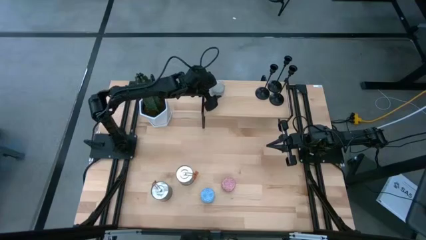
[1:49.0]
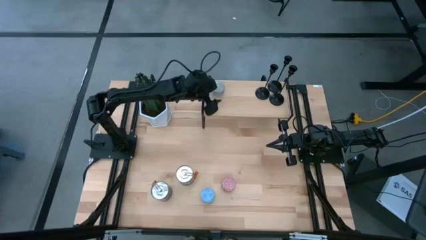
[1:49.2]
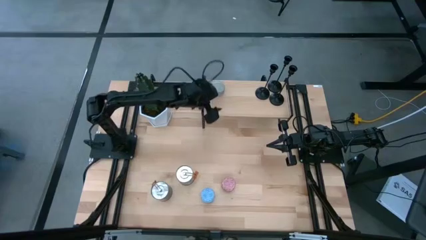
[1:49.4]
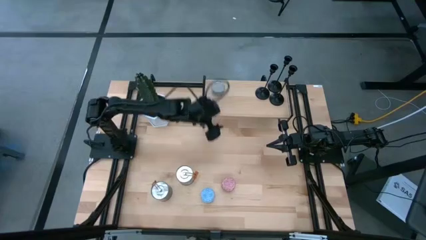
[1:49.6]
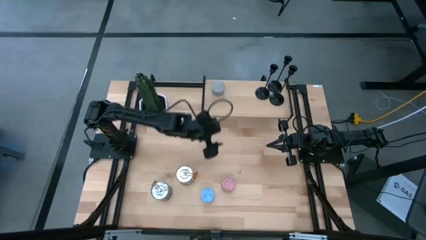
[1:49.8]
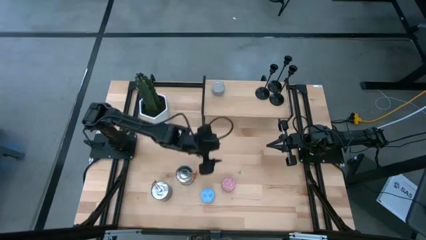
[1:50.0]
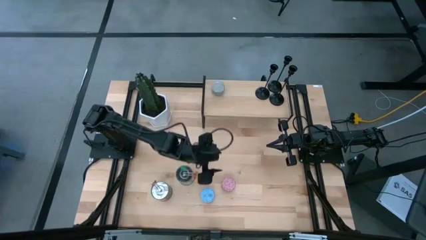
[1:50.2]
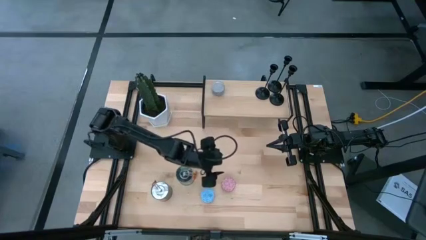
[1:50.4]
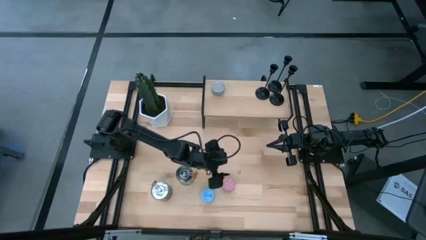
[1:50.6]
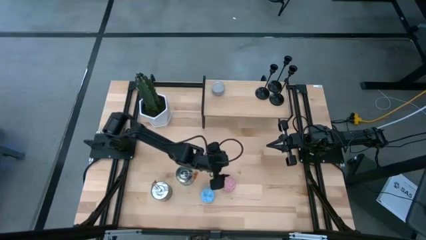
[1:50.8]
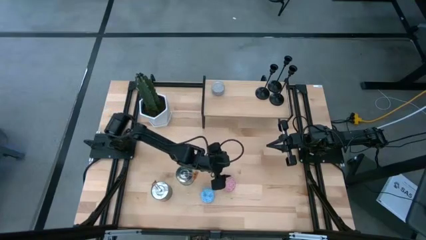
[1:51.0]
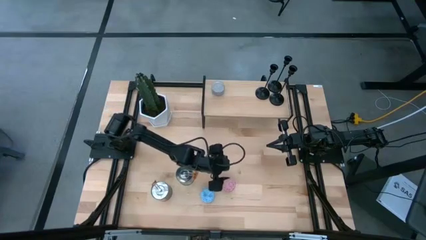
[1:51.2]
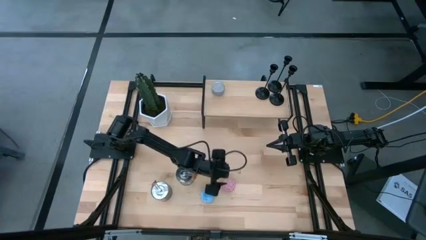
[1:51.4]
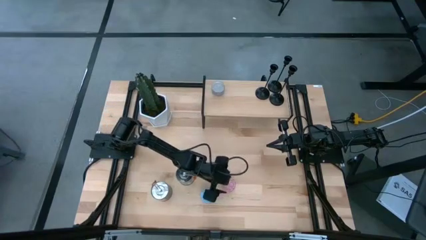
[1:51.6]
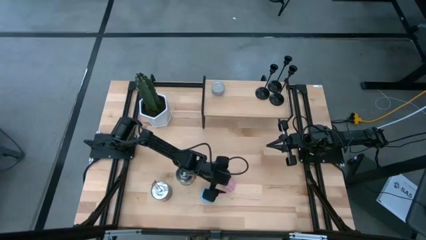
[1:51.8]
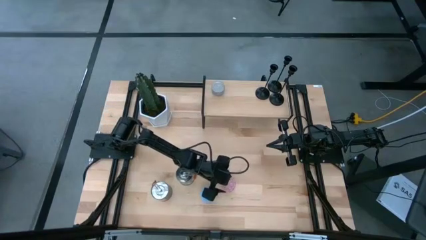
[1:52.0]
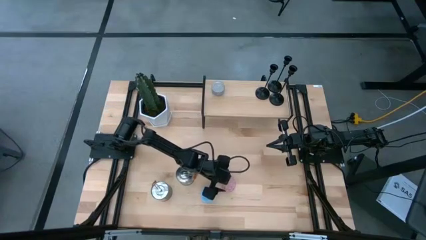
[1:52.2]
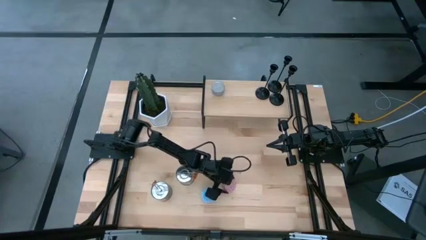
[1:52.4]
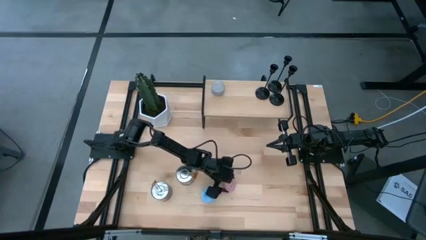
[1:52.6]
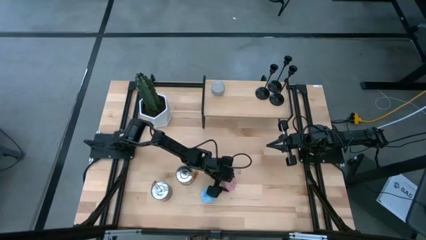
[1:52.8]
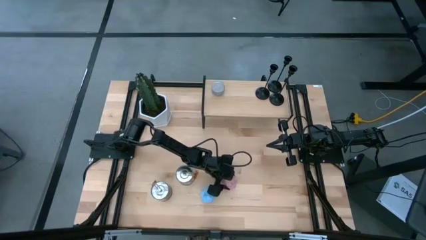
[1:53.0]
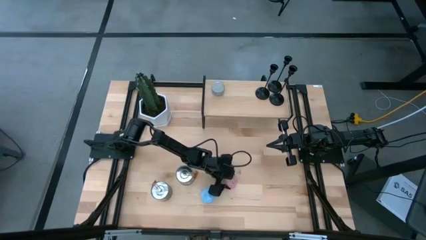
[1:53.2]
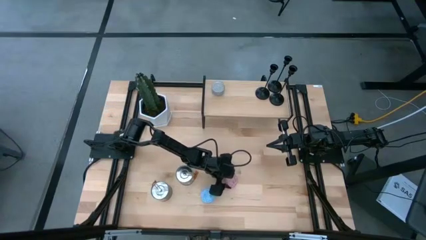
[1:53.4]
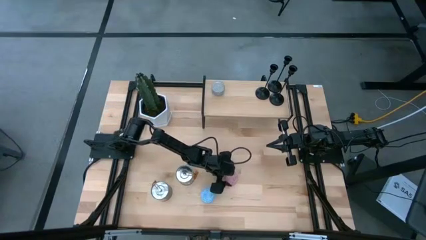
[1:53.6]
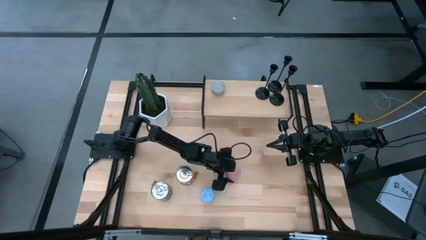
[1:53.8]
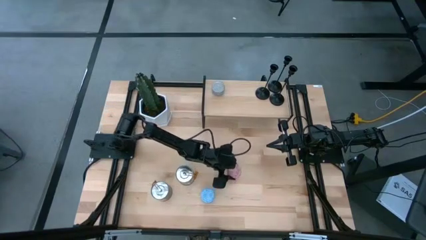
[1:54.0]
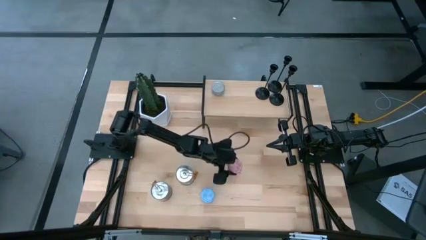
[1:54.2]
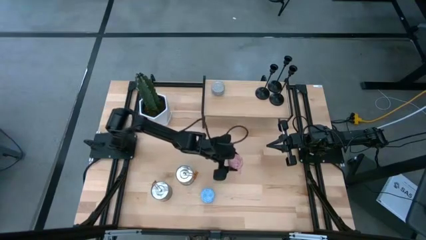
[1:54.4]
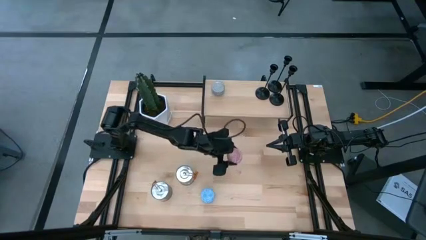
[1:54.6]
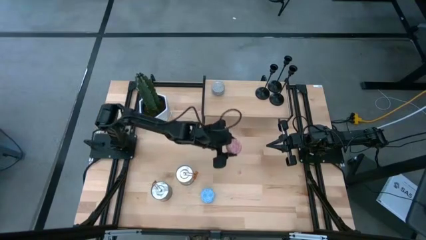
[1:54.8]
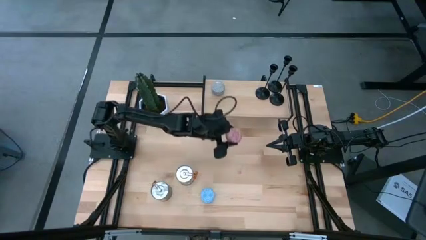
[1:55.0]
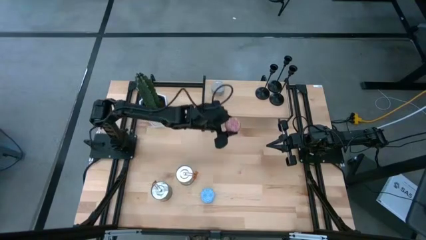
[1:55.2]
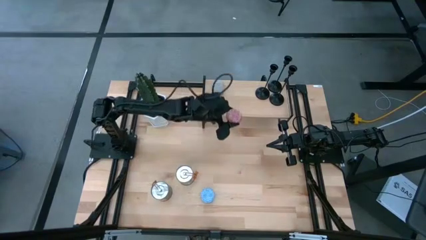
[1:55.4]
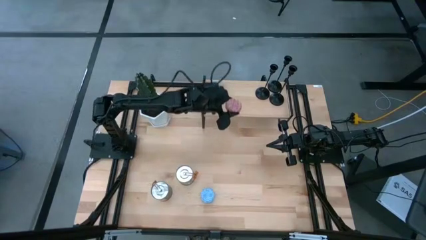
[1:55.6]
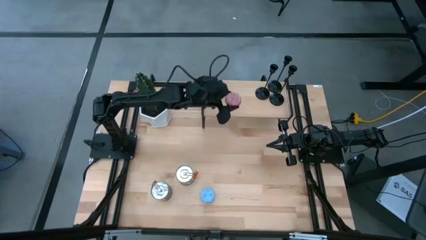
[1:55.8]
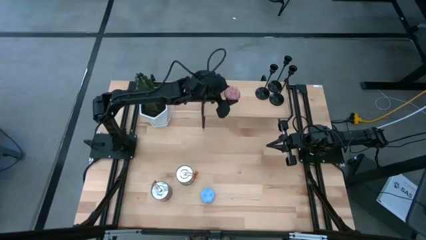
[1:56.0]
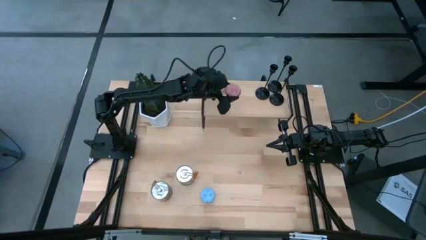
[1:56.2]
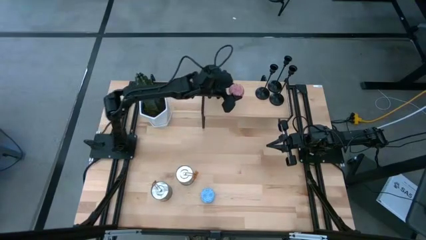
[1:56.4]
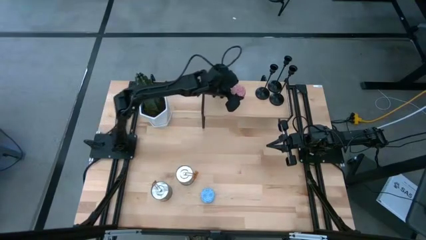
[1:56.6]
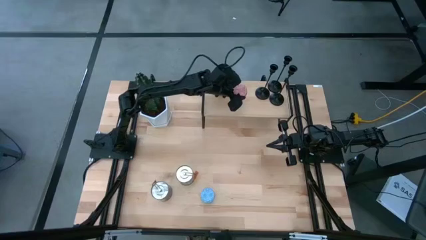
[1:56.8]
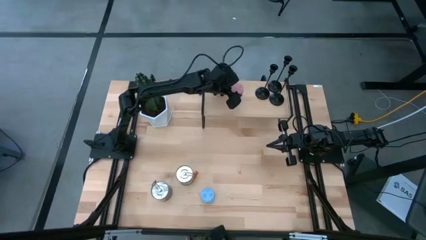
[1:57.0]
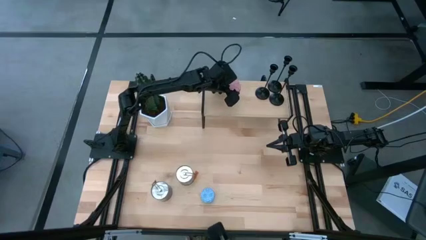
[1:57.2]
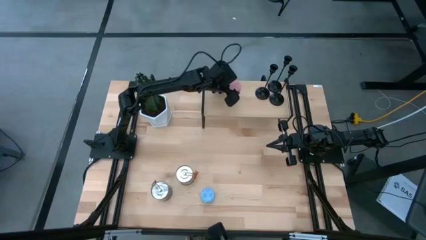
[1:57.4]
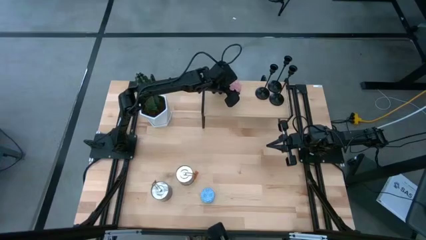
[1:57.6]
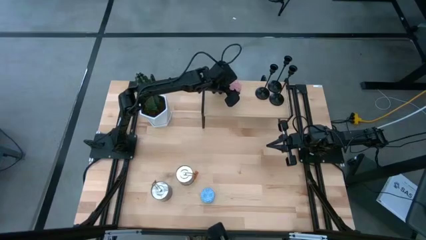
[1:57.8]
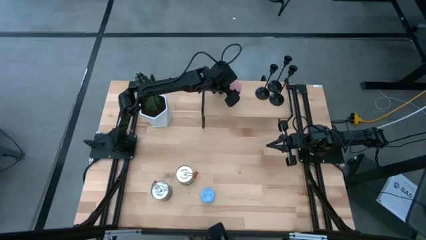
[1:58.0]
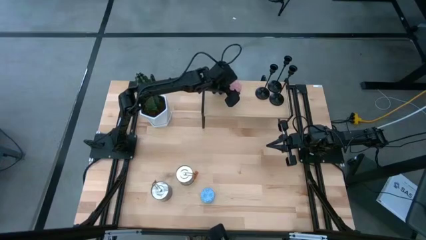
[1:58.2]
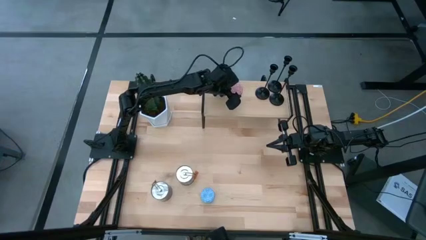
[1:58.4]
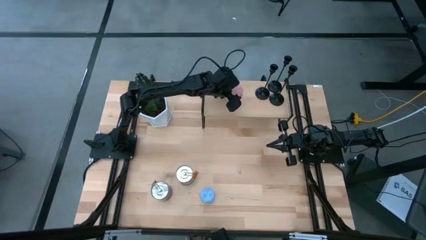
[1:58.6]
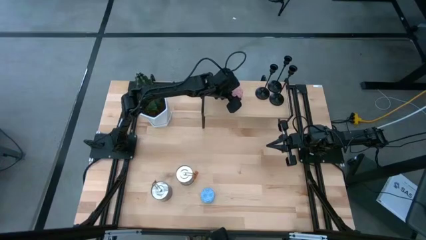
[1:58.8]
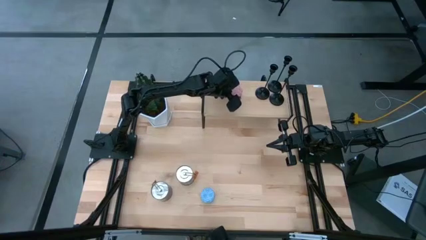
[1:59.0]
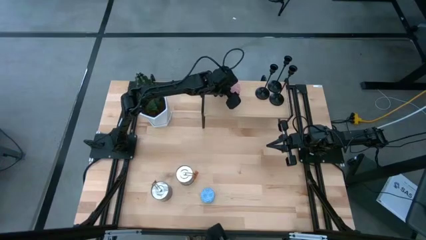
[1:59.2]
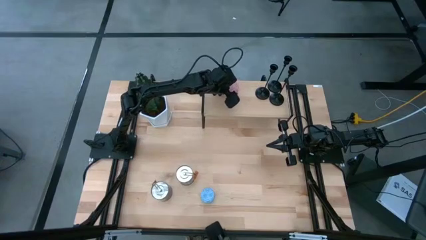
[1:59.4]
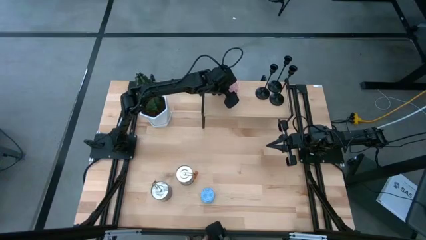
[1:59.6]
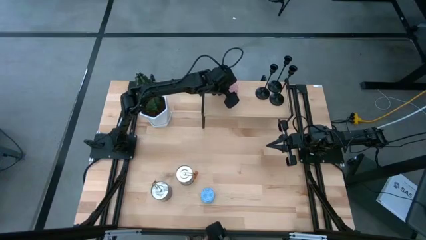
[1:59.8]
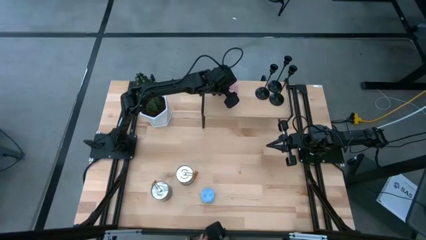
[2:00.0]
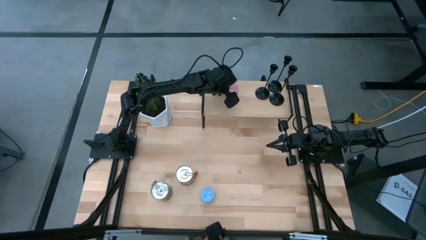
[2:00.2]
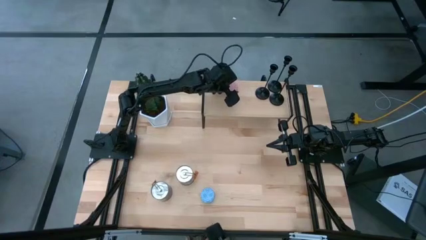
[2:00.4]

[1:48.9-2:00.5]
Task: Pick & Place candle stick holders
Put the pink scented candle on the shelf

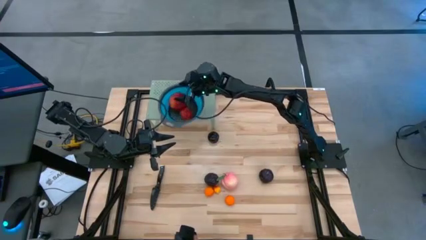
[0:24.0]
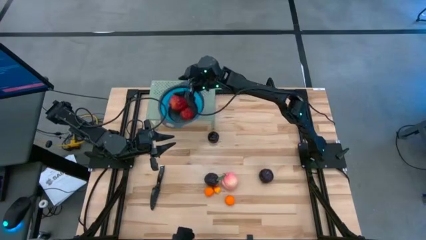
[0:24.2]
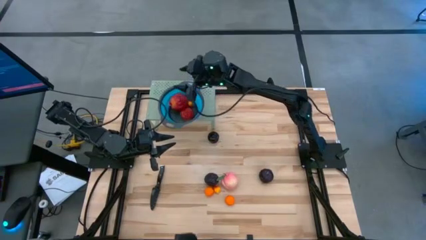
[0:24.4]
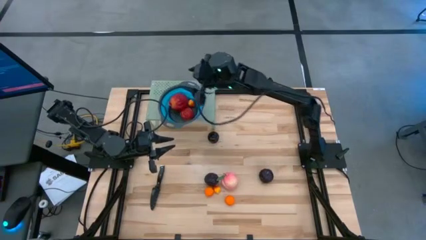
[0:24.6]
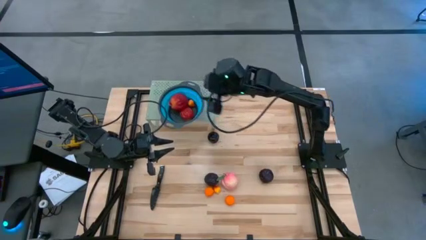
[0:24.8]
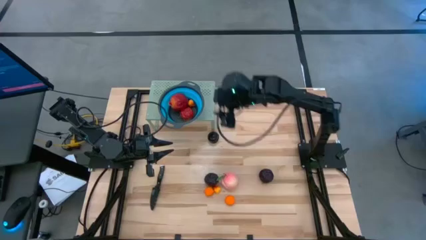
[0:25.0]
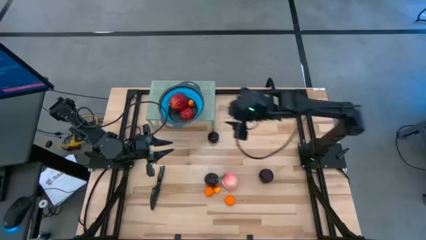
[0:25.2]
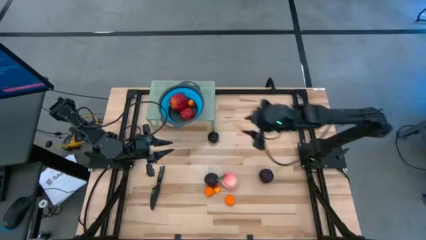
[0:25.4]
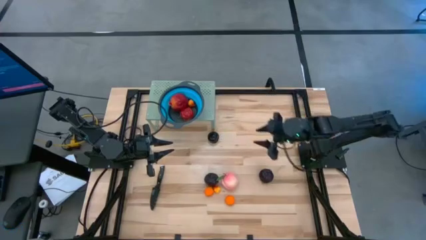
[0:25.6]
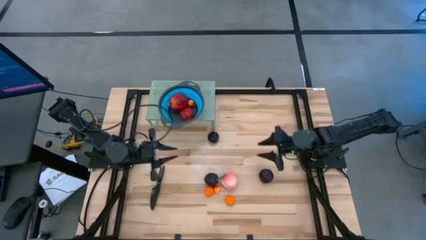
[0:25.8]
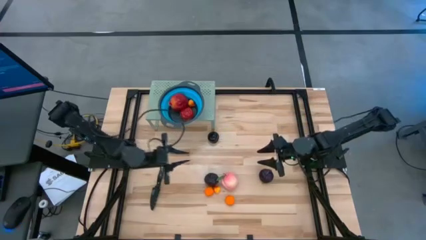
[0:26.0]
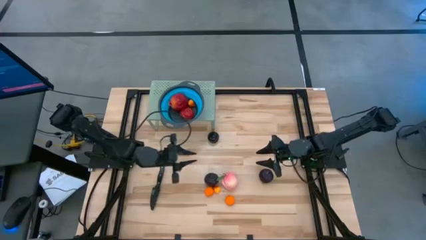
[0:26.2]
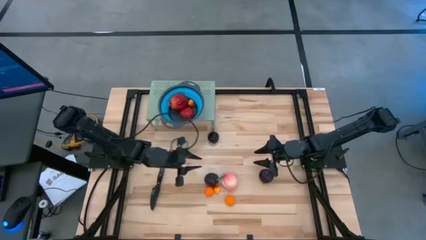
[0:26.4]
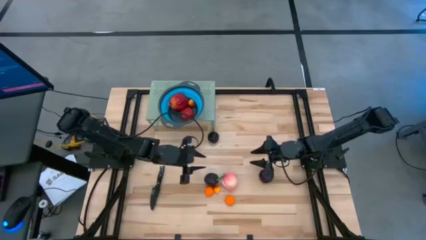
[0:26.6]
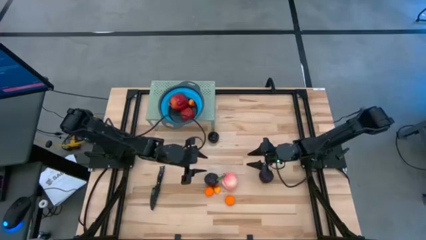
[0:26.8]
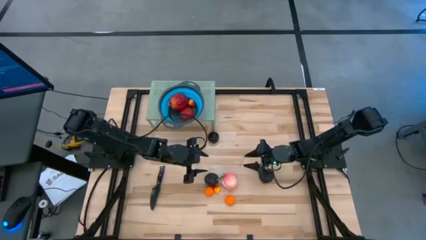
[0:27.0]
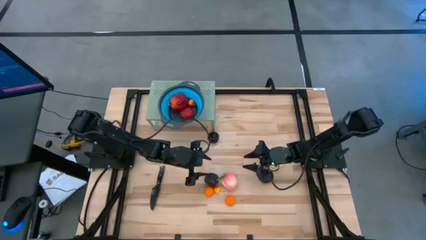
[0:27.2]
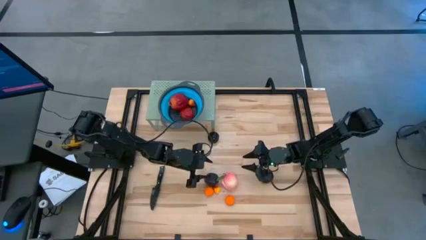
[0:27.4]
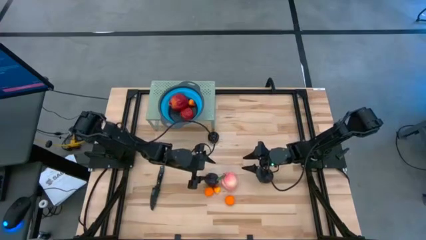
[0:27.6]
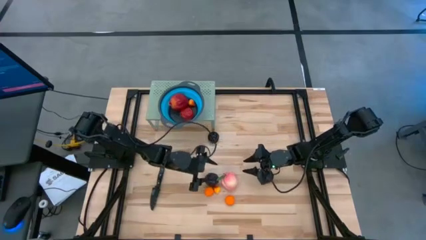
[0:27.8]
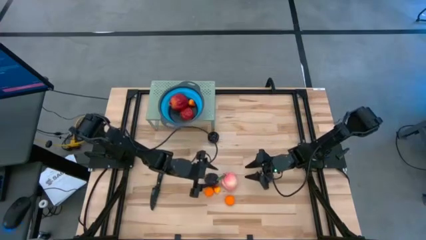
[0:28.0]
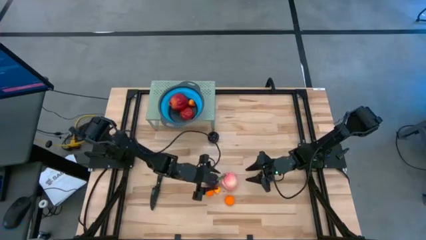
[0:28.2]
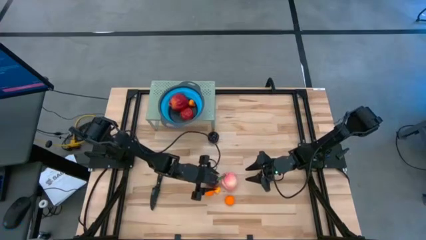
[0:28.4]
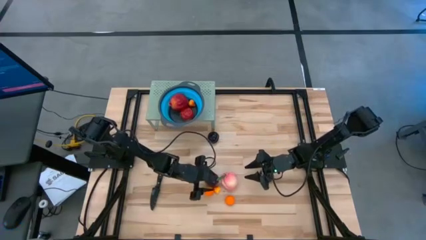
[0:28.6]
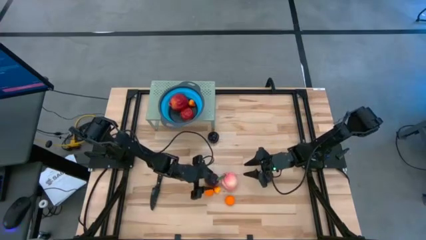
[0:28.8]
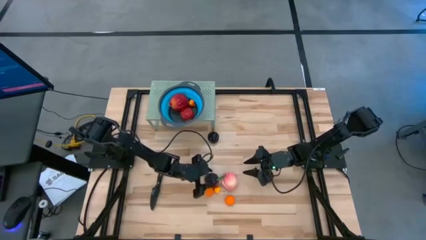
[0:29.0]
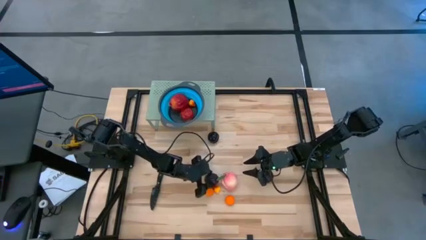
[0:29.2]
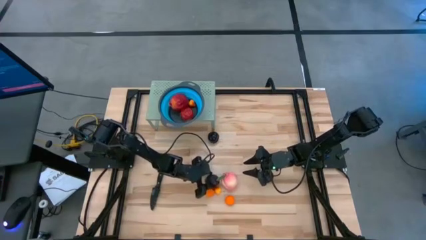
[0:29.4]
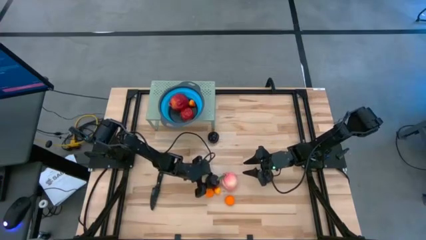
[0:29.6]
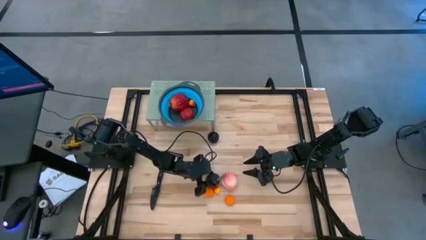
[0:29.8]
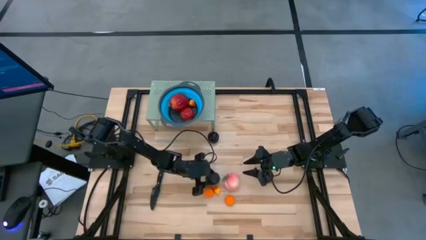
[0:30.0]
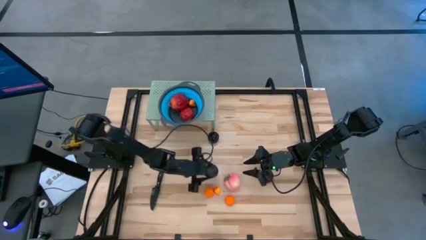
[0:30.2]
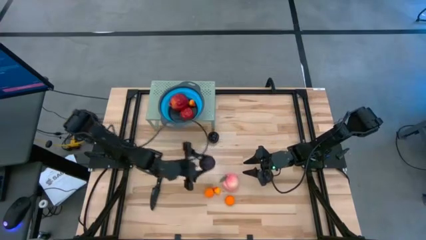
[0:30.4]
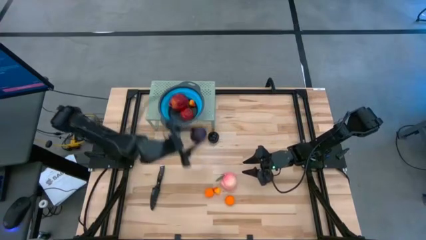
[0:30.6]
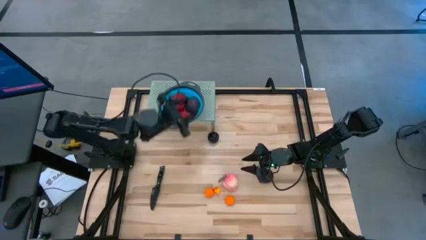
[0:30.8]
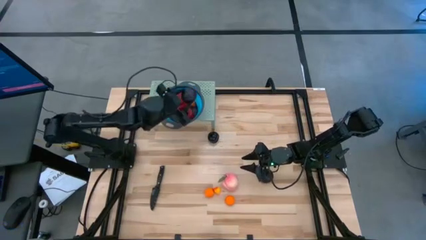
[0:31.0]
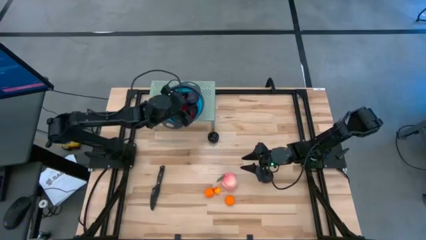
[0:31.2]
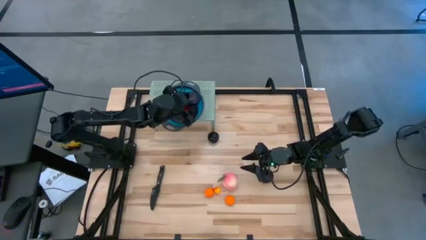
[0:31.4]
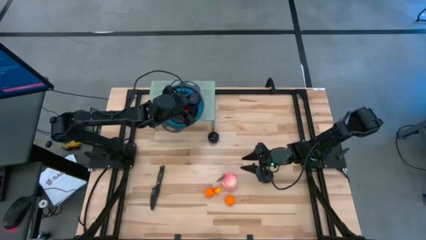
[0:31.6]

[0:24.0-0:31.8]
Task: Pick & Place Fruit
Put the bottom left black plum into the blue strainer bowl on the shelf
